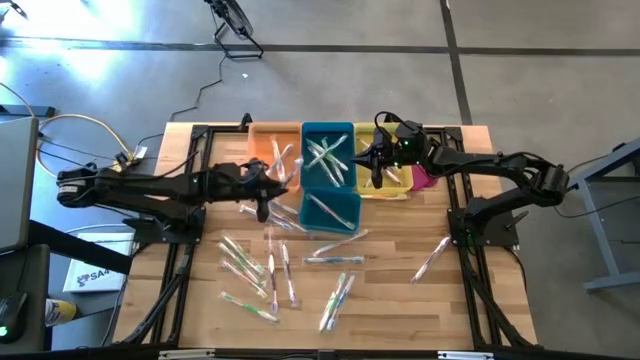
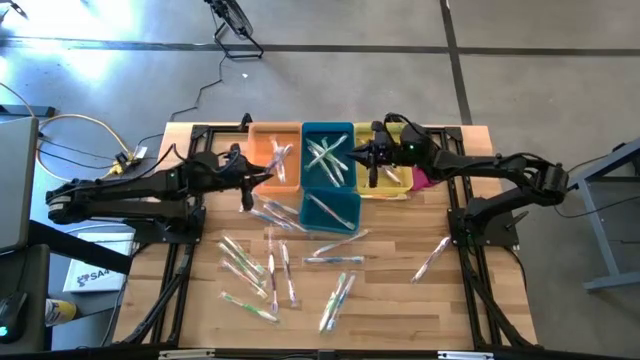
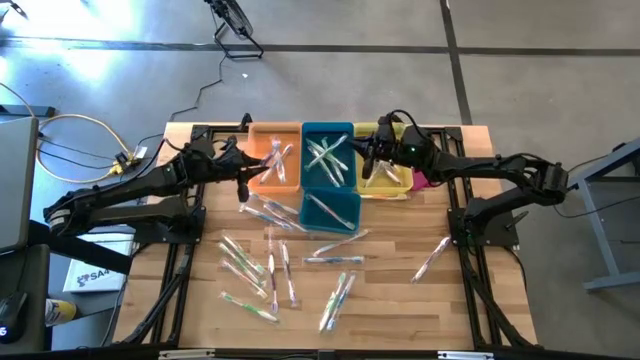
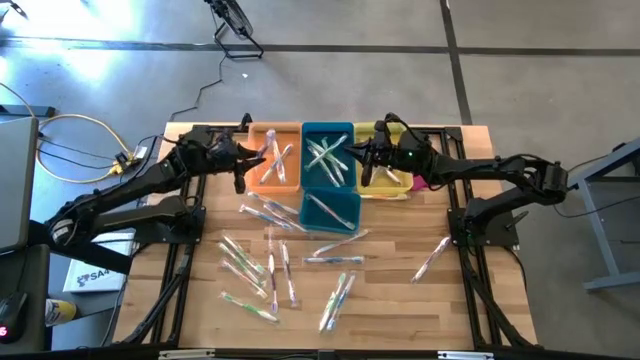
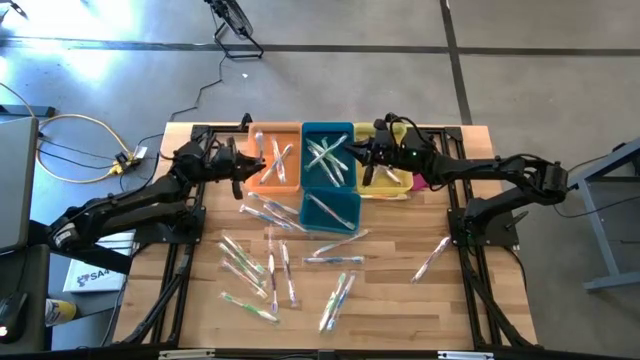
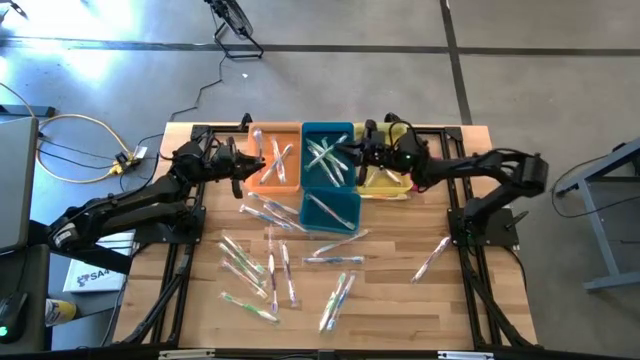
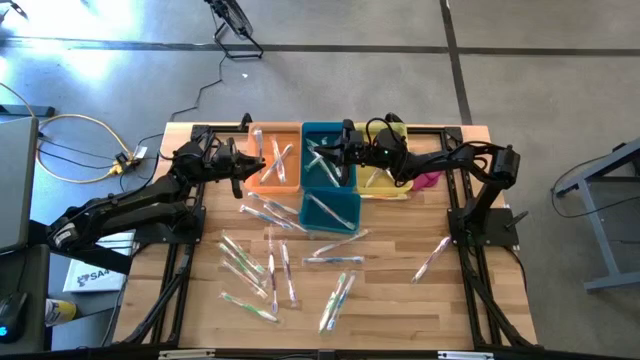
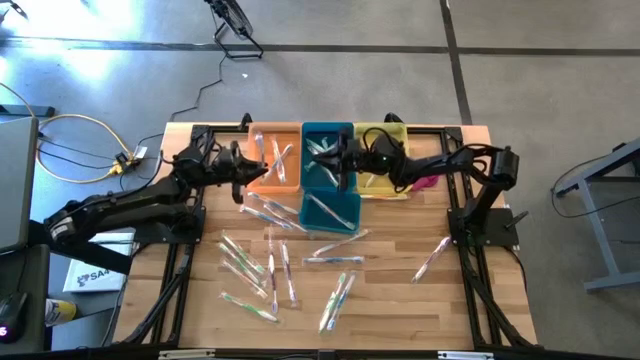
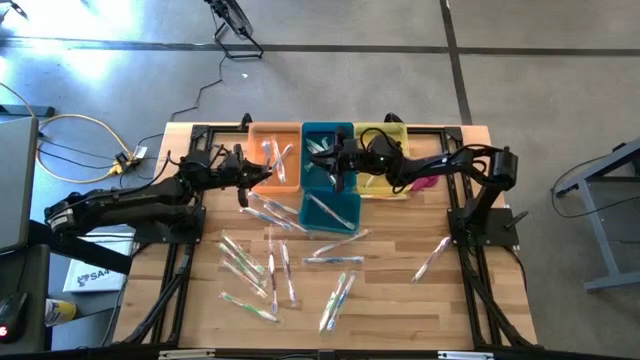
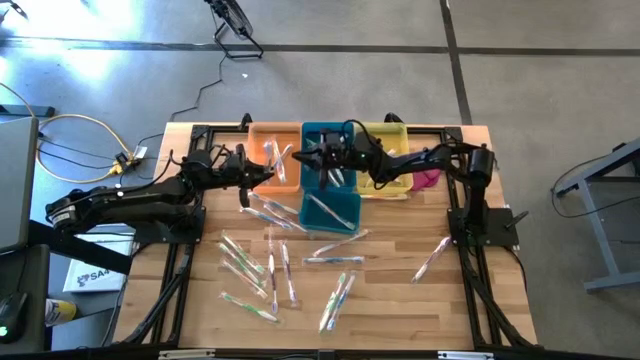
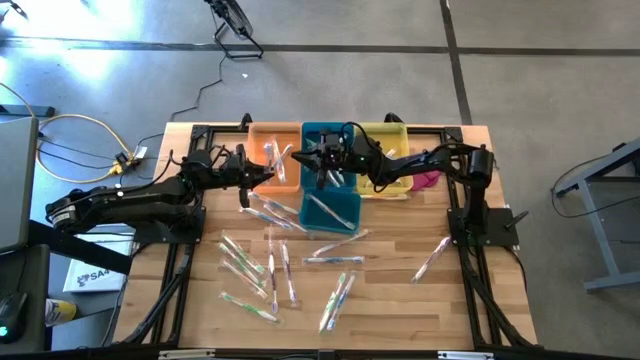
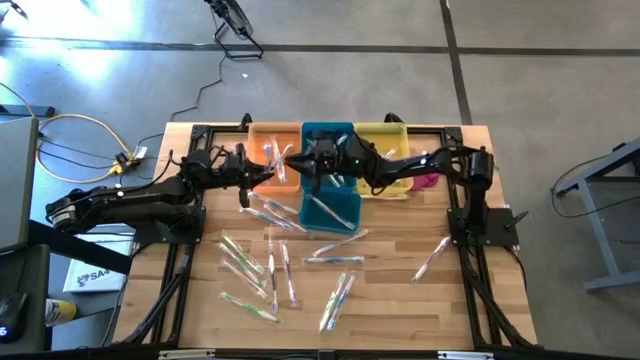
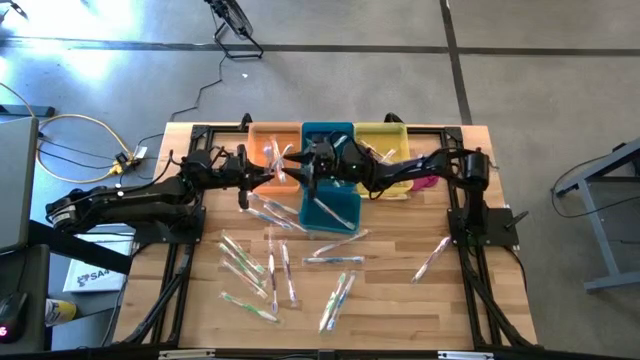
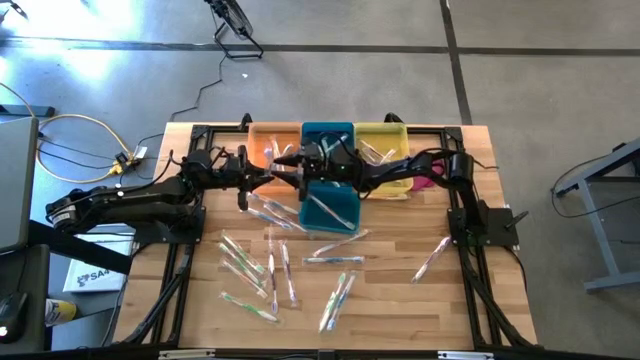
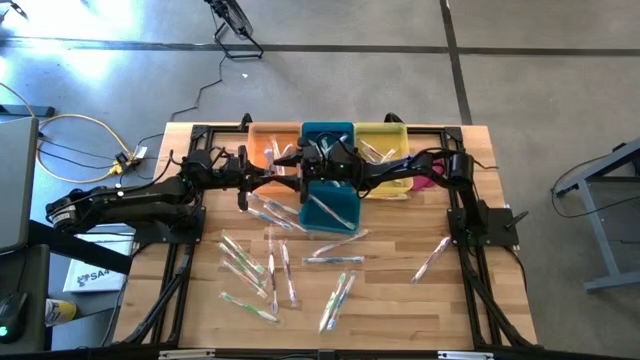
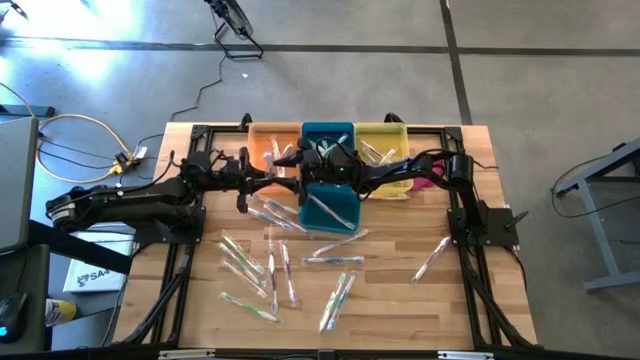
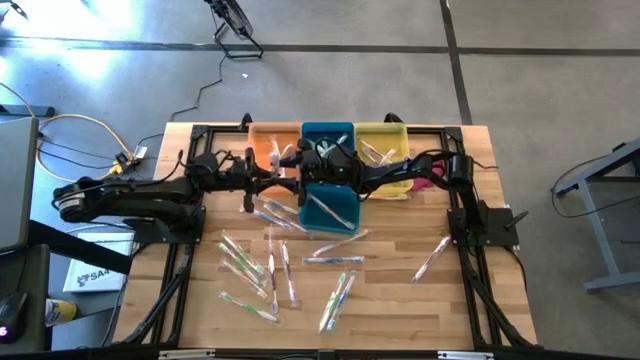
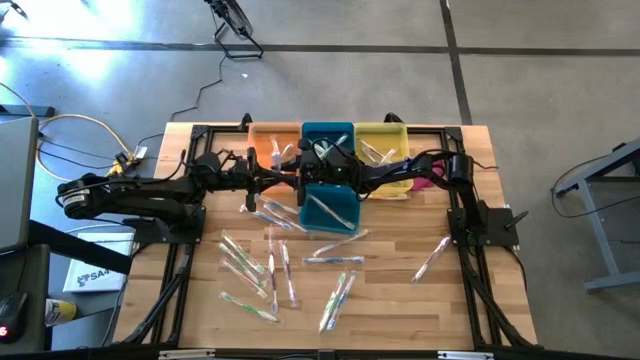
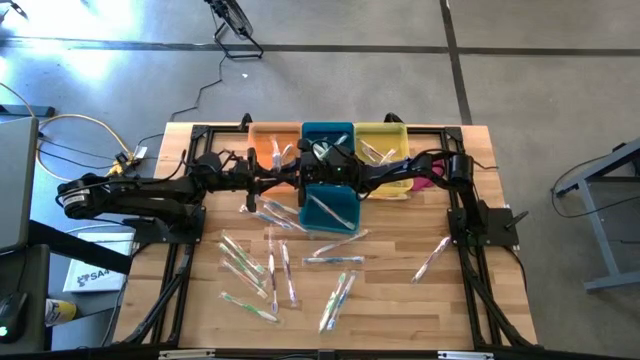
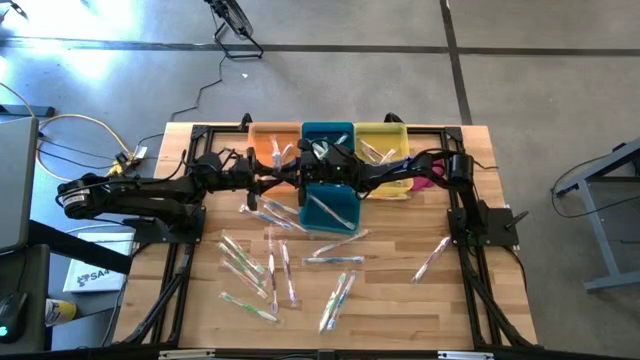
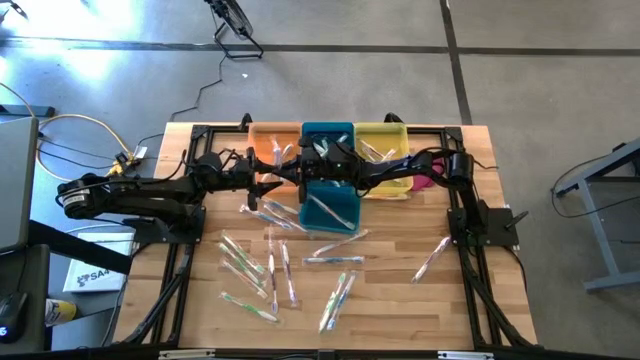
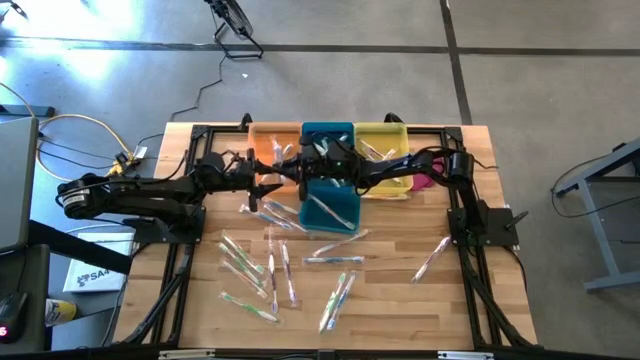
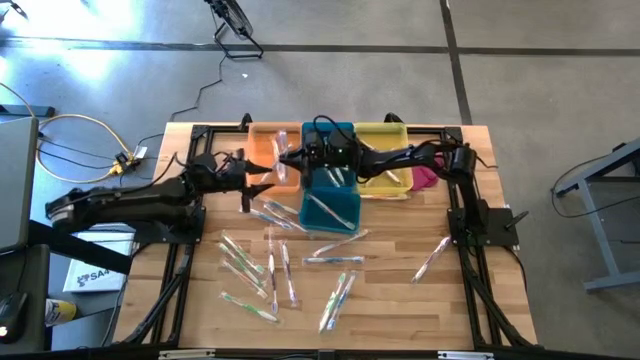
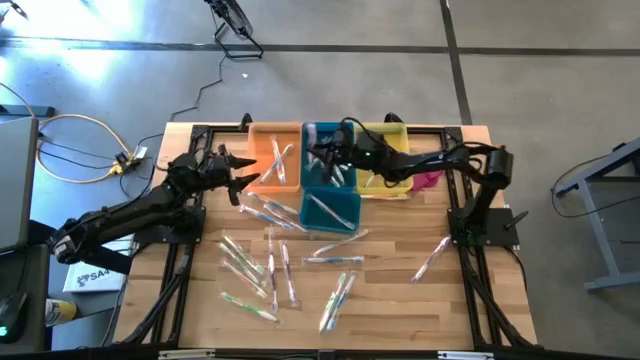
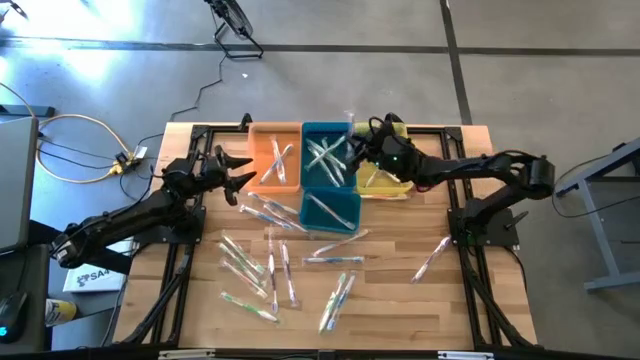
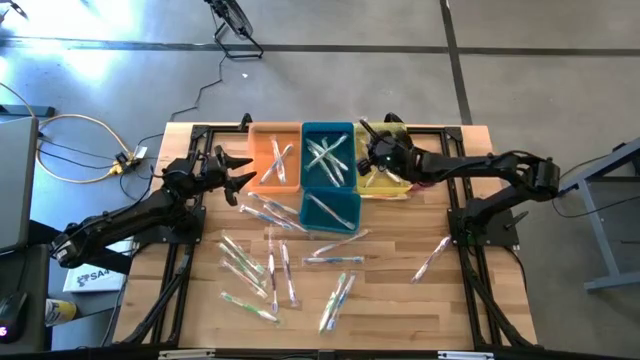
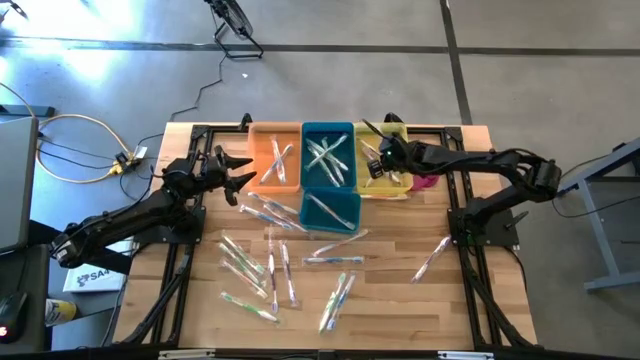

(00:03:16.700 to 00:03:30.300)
Task: Pick & Place Toothbrushes
Put the violet toothbrush into the yellow bin

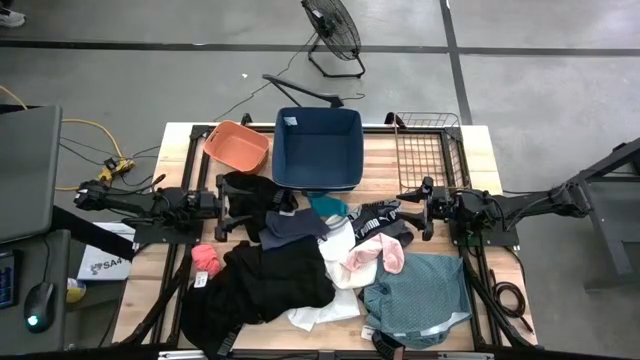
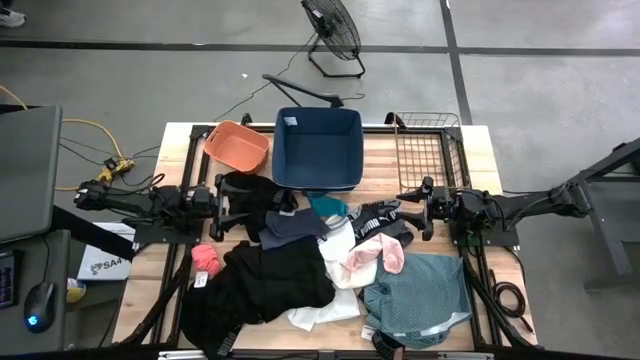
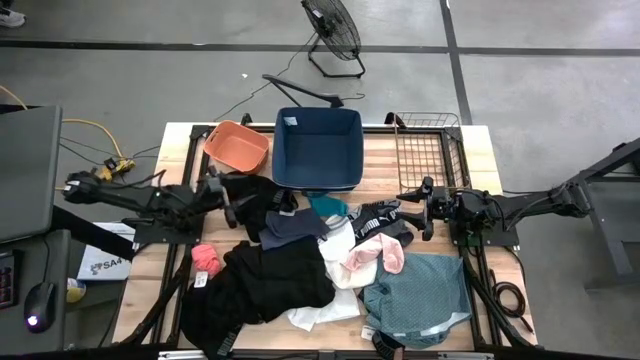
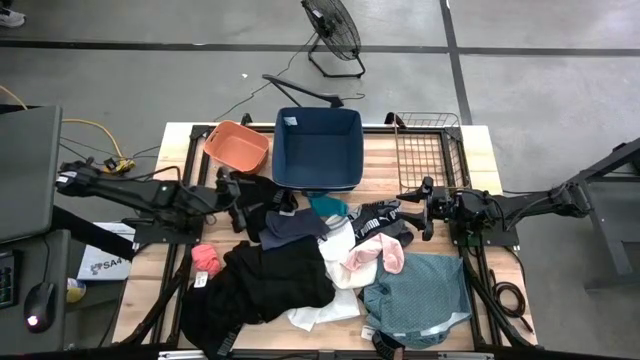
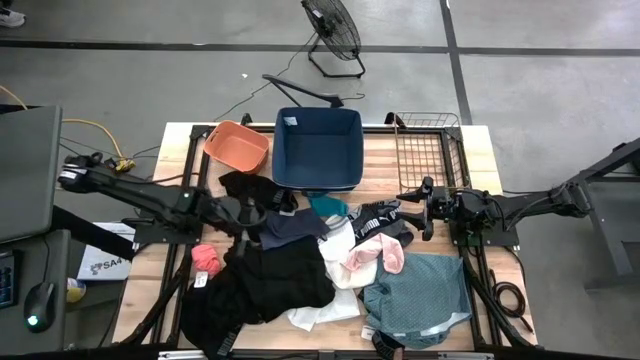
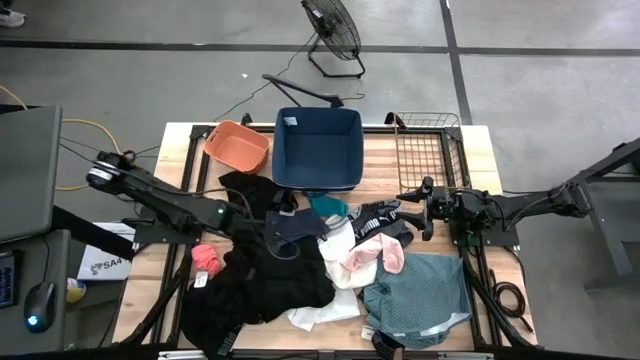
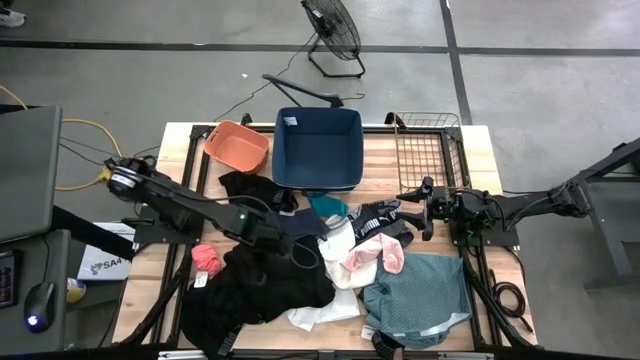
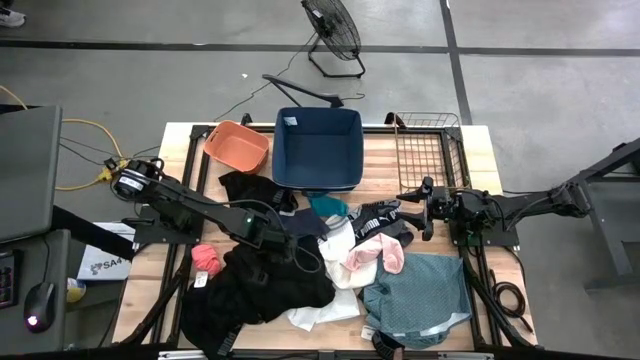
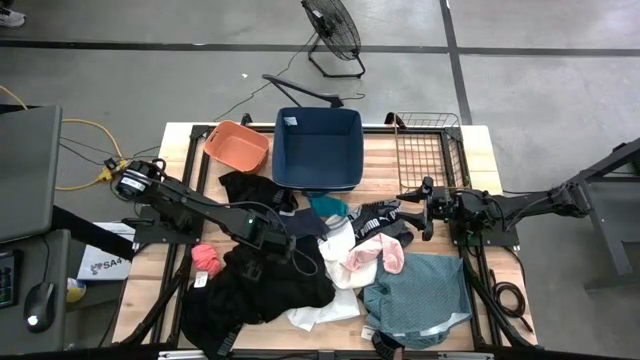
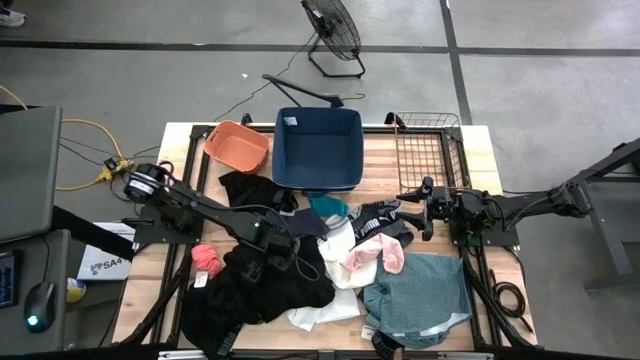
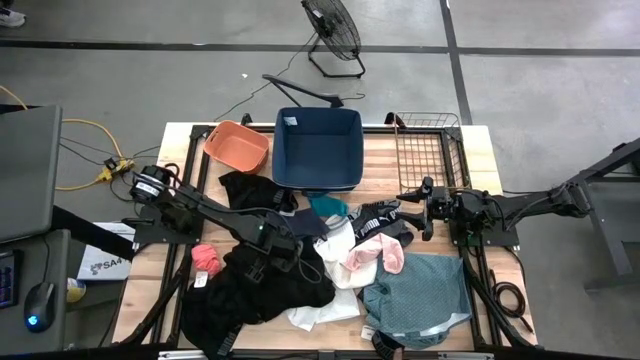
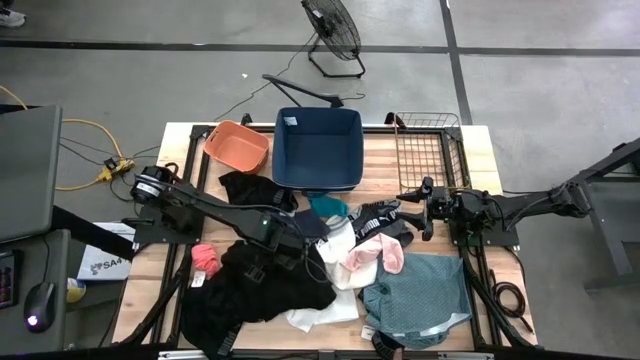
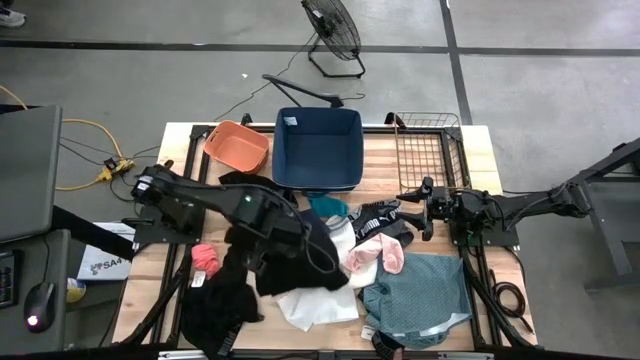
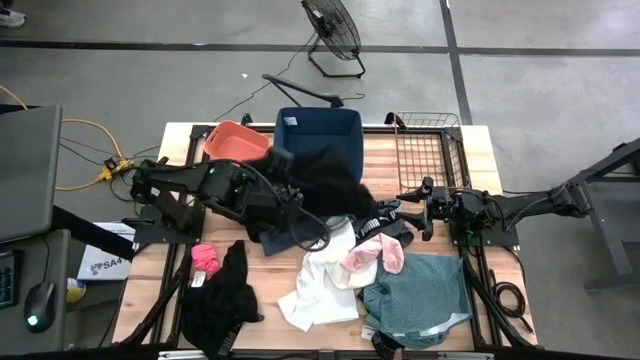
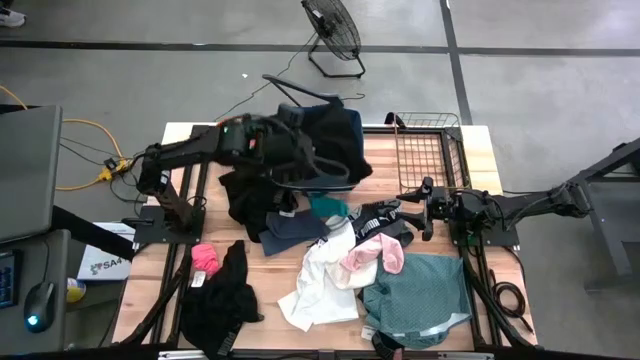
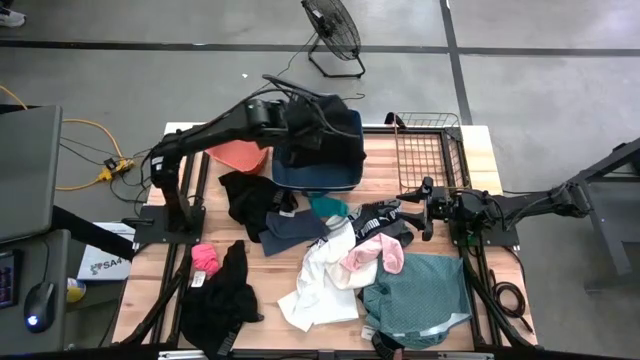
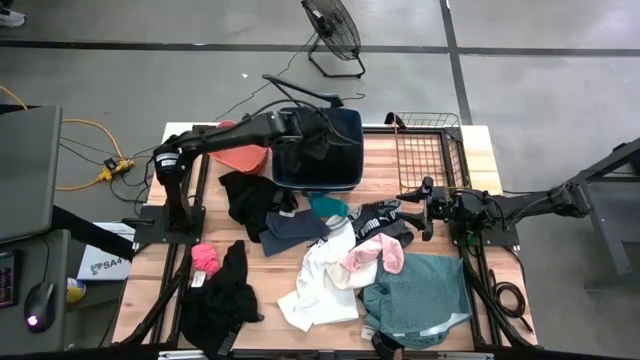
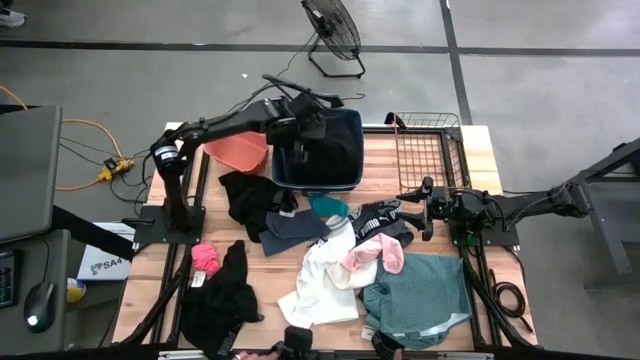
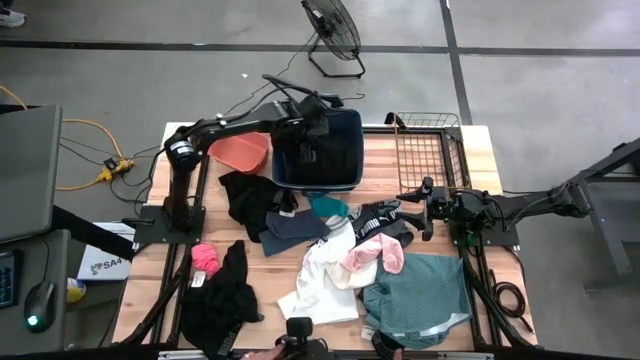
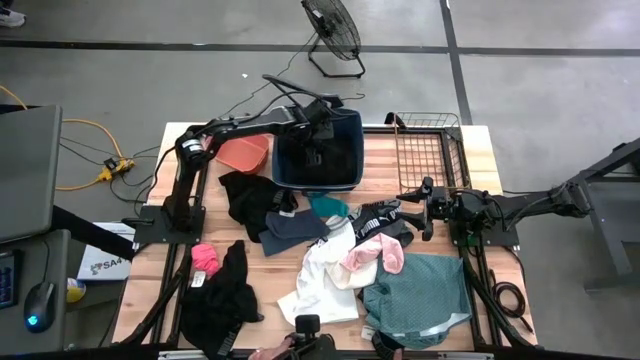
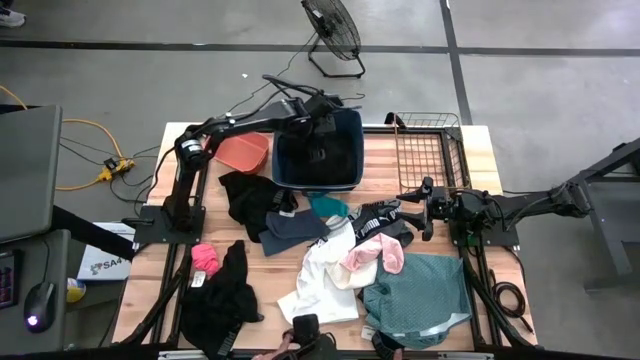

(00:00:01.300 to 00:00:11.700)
Task: Pick & Place Cloths
Put the black shirt into the blue bin
